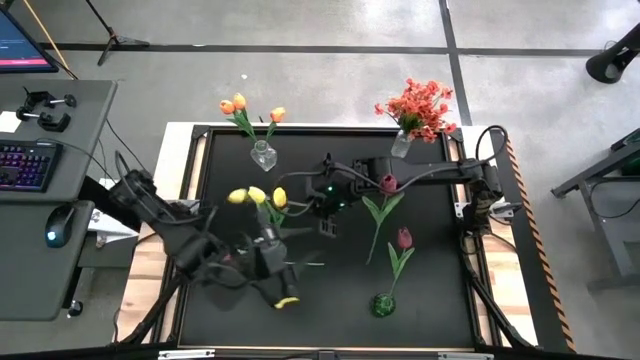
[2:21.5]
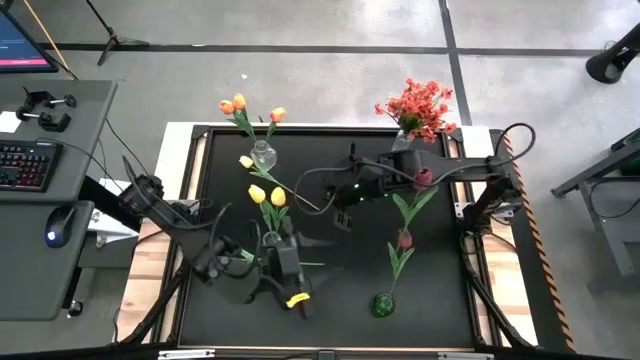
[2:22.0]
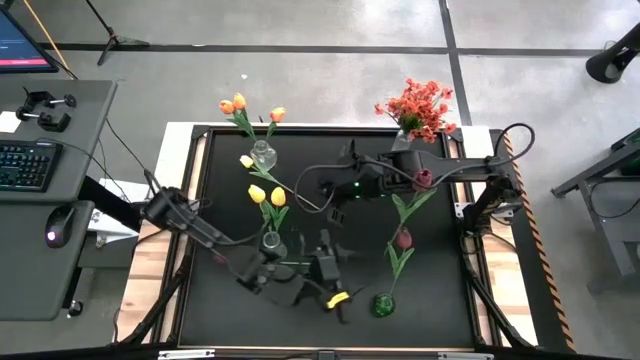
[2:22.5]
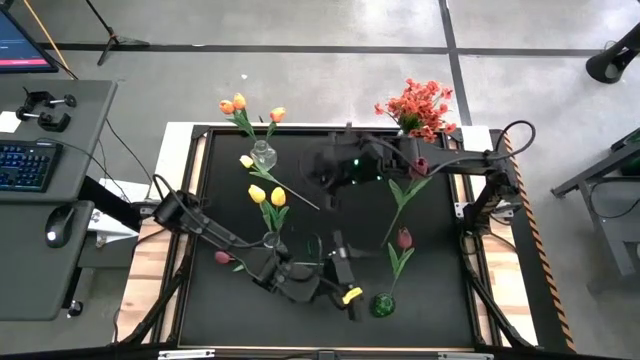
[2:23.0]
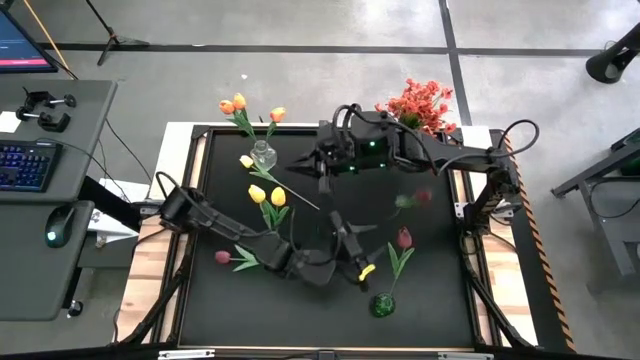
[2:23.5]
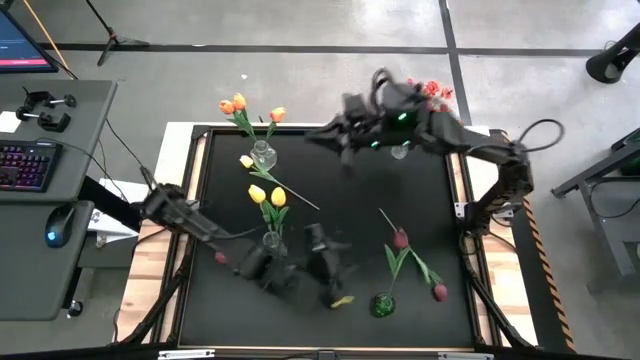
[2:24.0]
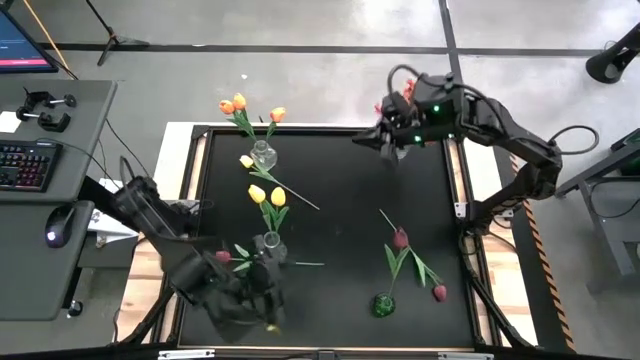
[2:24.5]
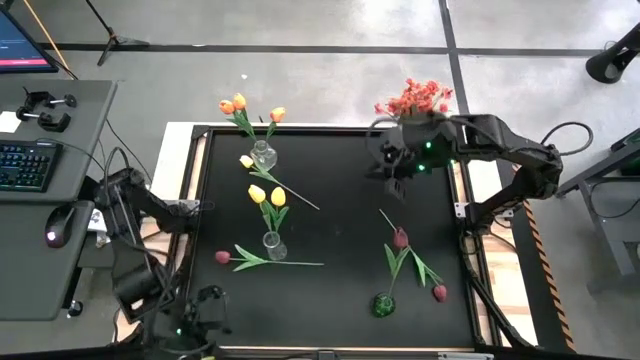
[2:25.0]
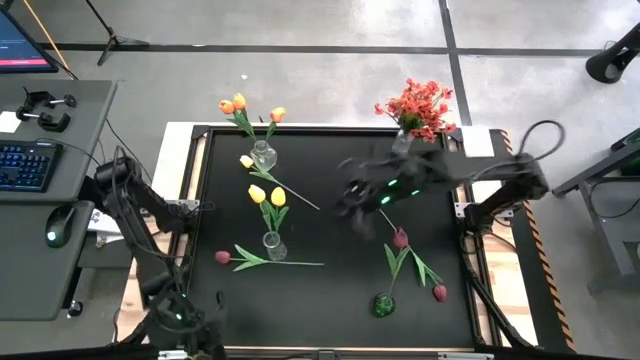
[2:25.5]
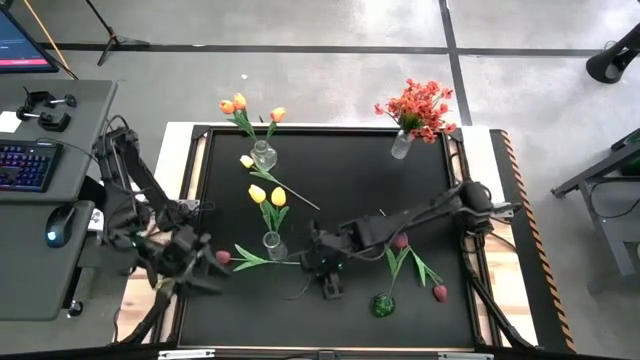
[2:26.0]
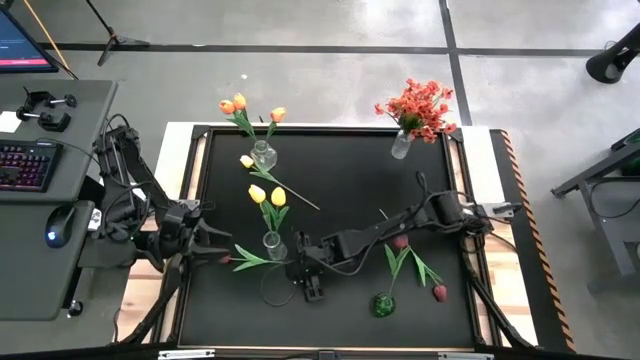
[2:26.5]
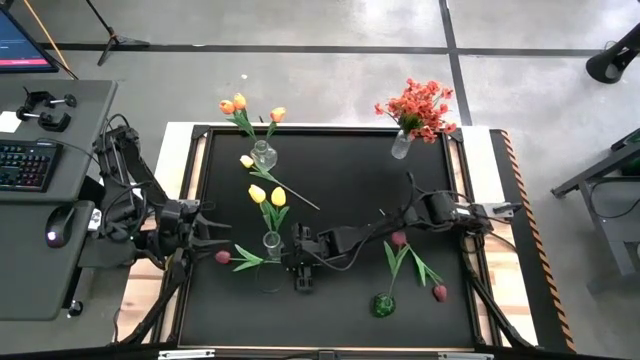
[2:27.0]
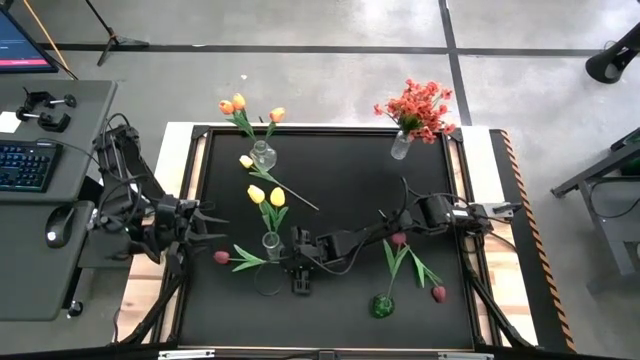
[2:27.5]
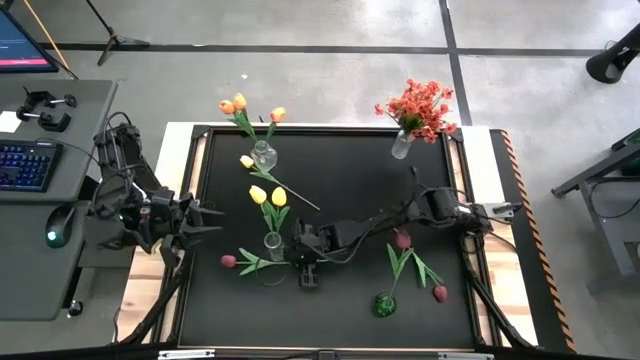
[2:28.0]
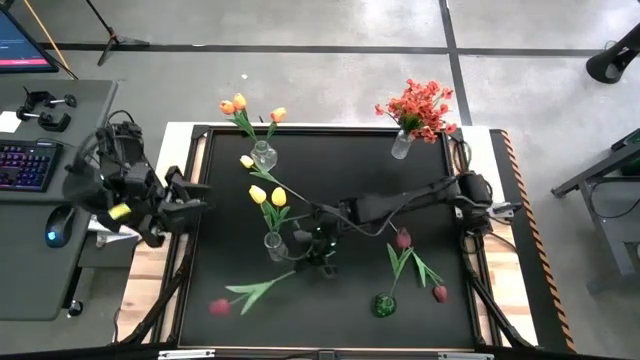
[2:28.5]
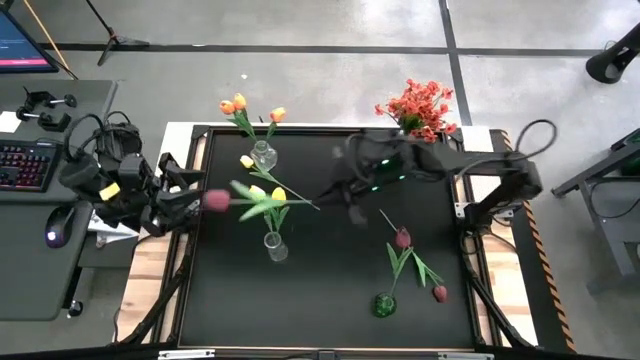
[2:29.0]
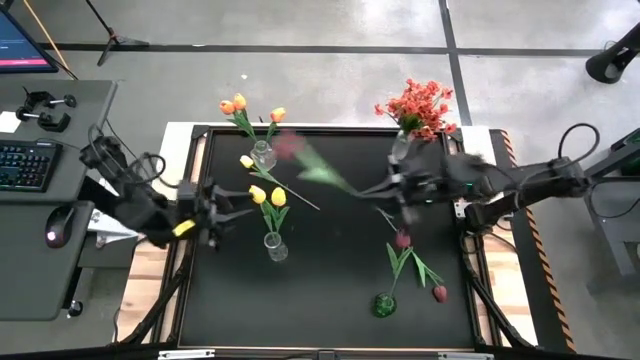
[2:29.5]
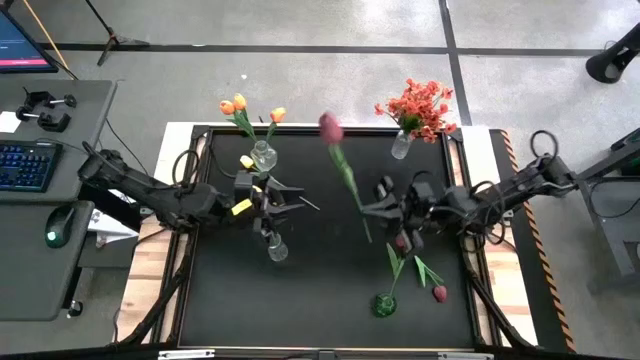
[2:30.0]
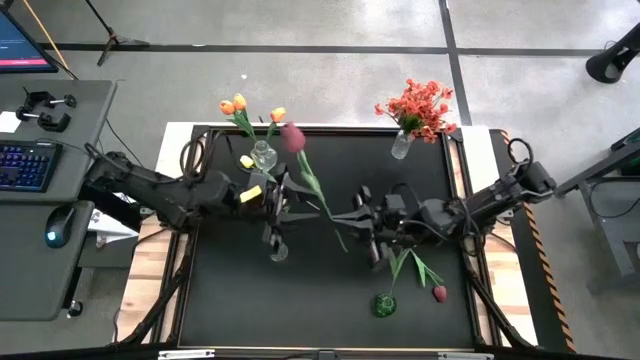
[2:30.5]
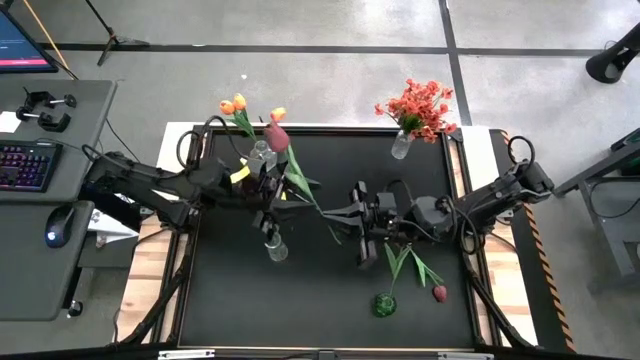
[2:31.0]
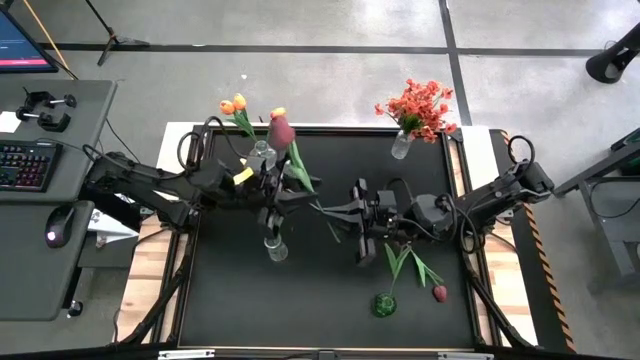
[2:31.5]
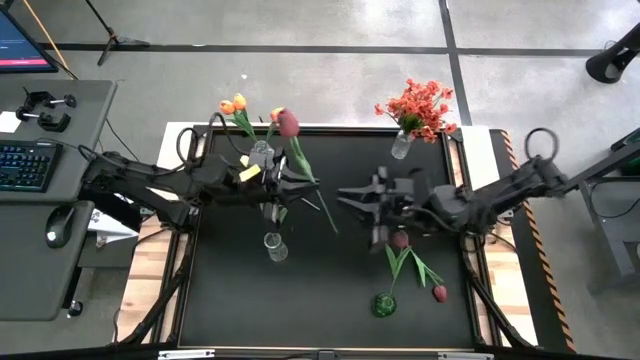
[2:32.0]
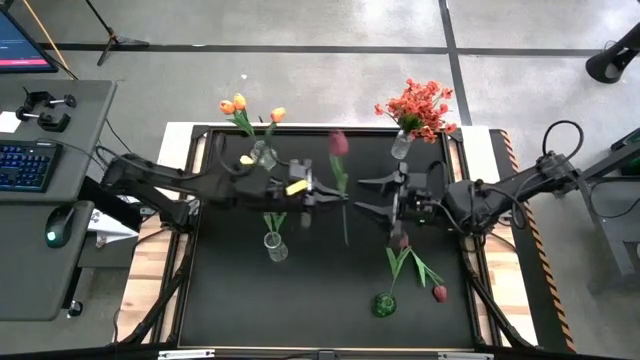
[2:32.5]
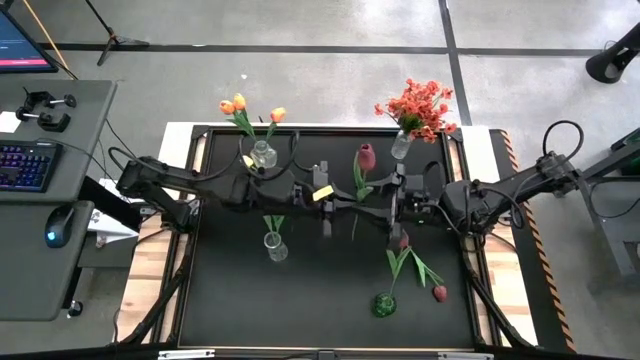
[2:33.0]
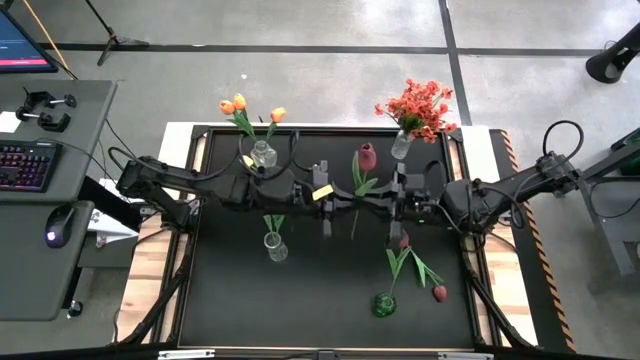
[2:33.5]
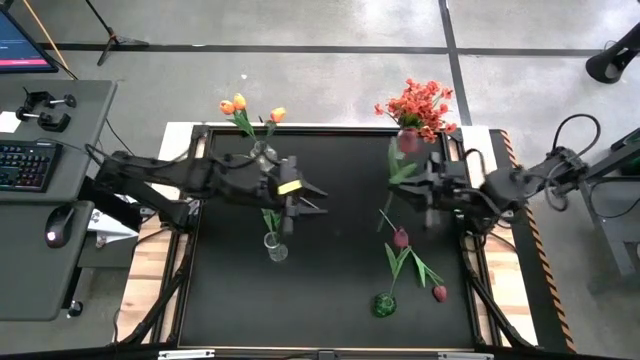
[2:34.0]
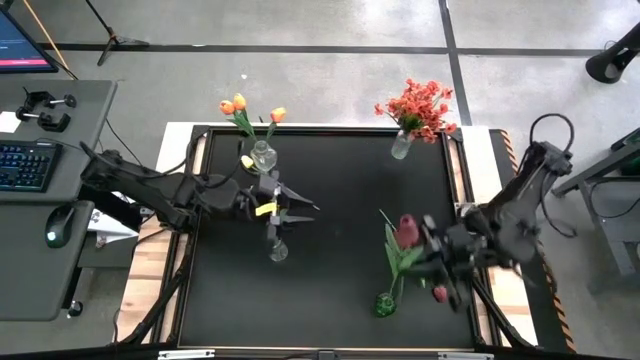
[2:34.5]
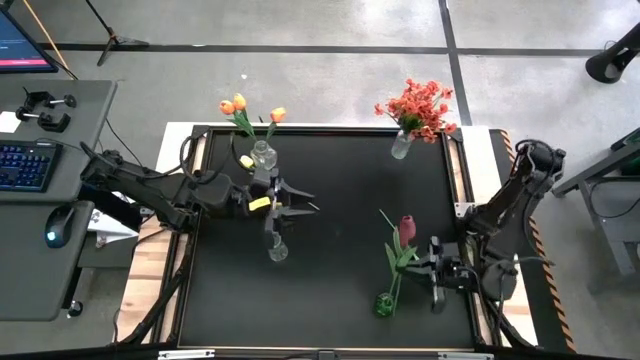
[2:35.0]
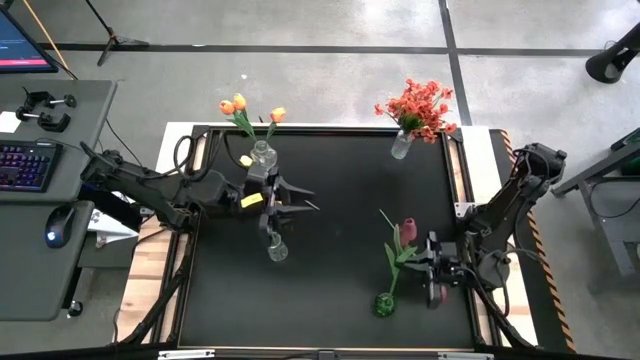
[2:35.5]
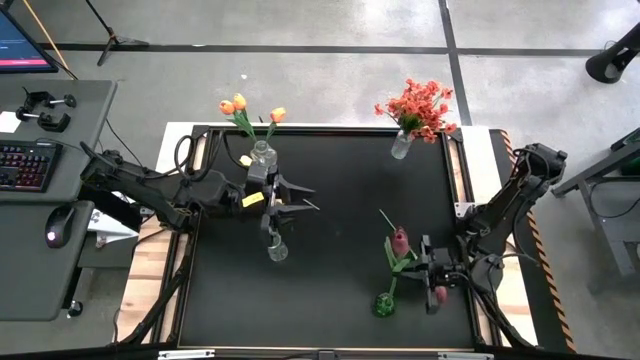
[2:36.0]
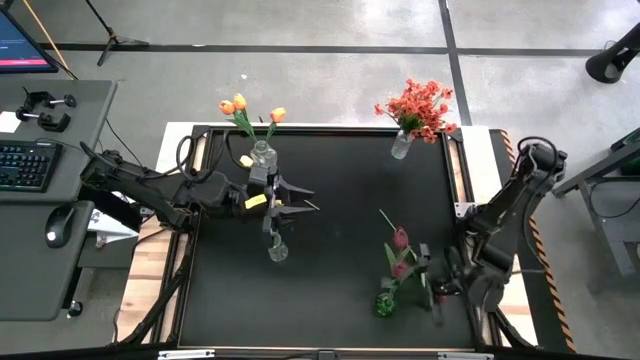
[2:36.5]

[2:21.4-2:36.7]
Task: Sort flowers into vase by color
Put the left dark red flower into the green vase
